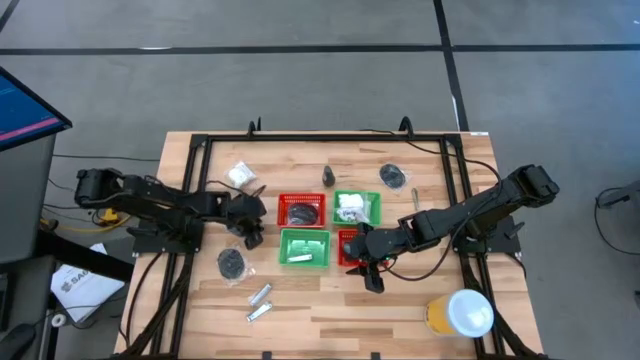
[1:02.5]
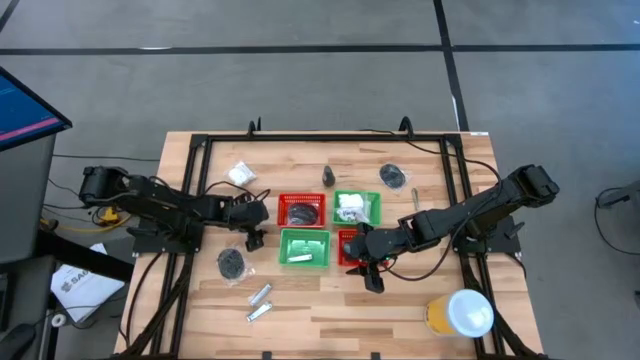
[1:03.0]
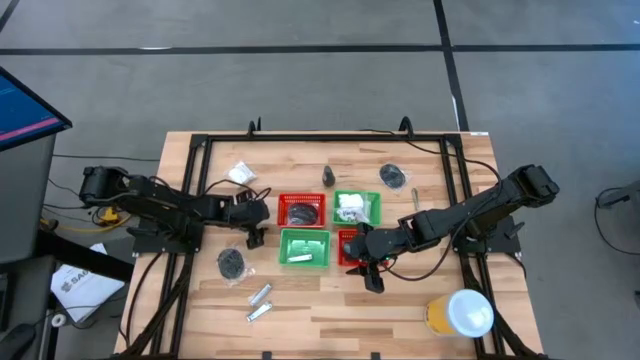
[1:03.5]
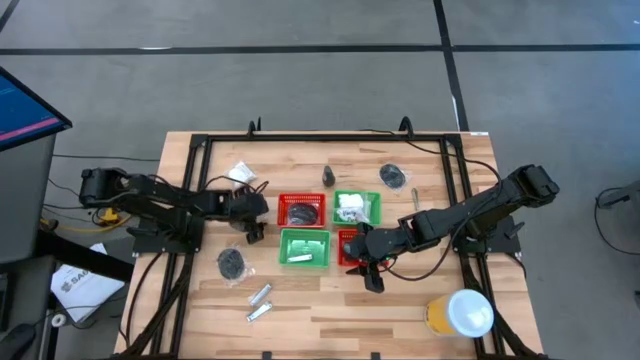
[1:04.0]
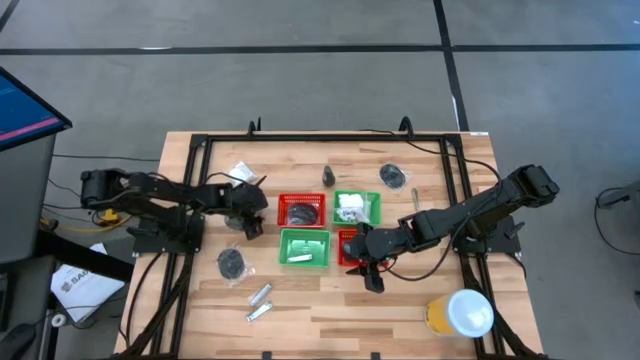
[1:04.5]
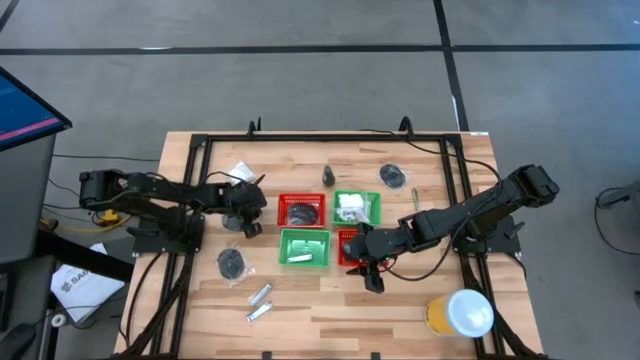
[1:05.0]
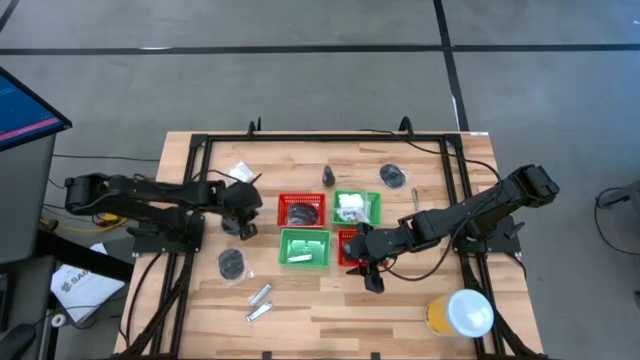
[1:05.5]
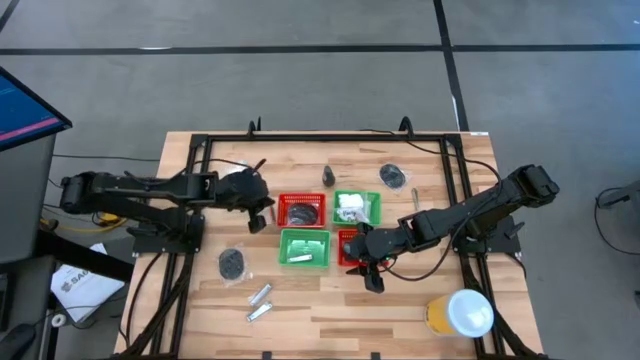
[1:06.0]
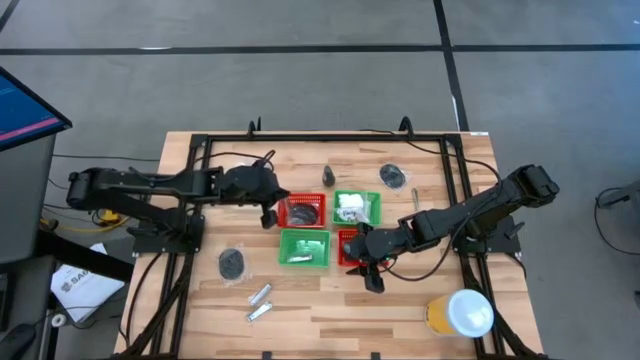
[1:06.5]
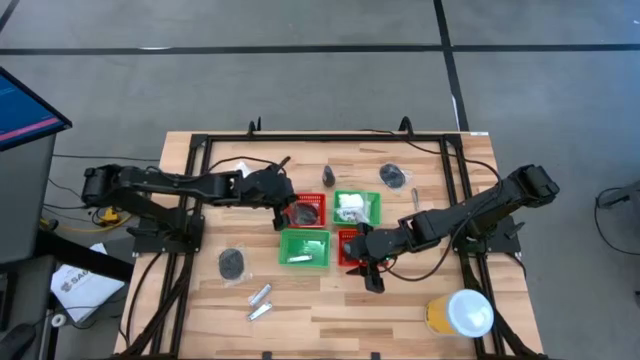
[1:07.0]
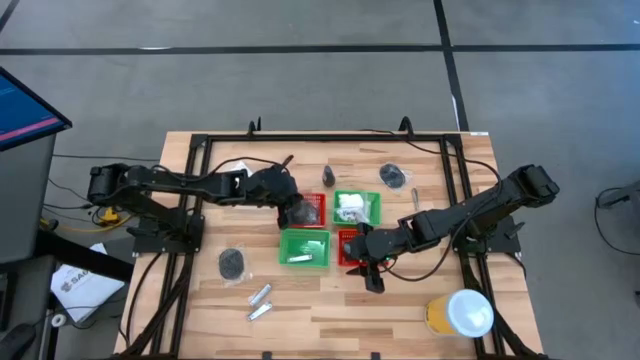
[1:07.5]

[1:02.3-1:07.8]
Task: Pick & Place Travel size toiletries
Put the black hairbrush into the left red basket

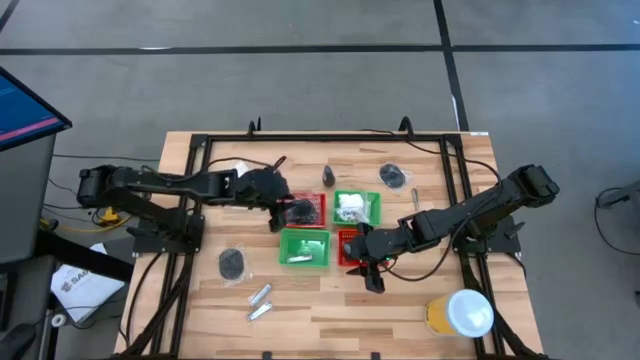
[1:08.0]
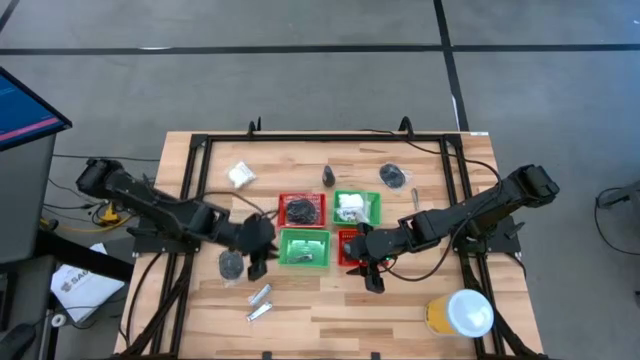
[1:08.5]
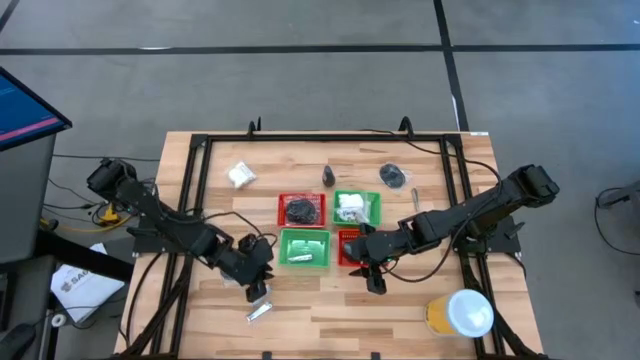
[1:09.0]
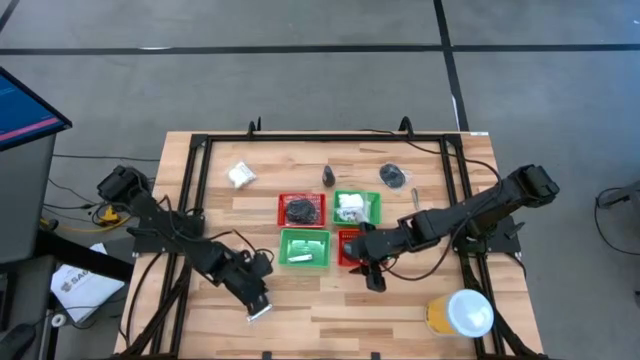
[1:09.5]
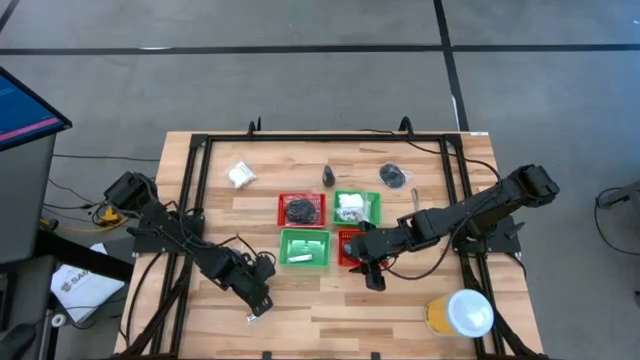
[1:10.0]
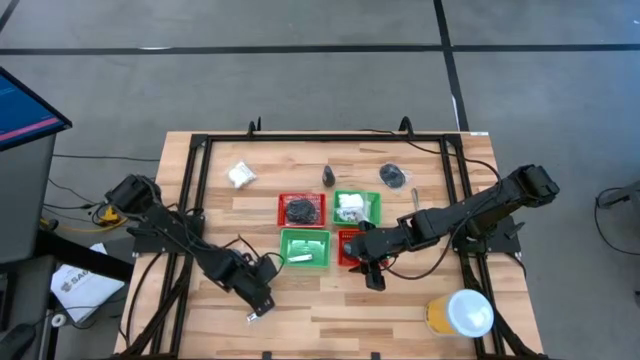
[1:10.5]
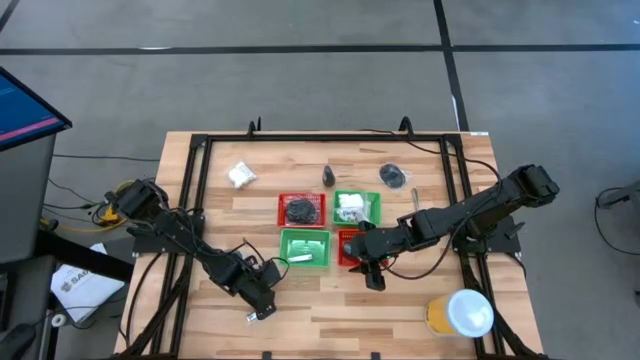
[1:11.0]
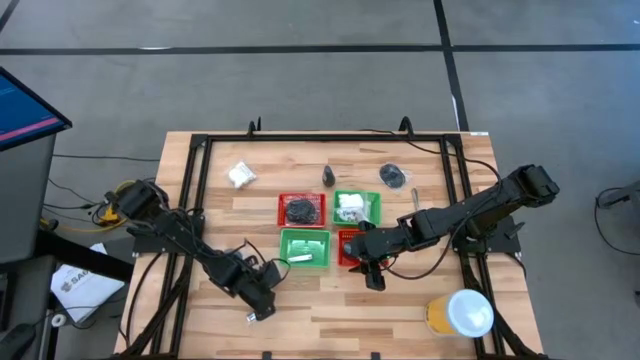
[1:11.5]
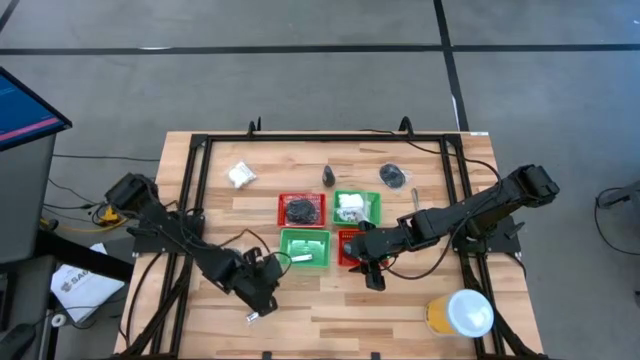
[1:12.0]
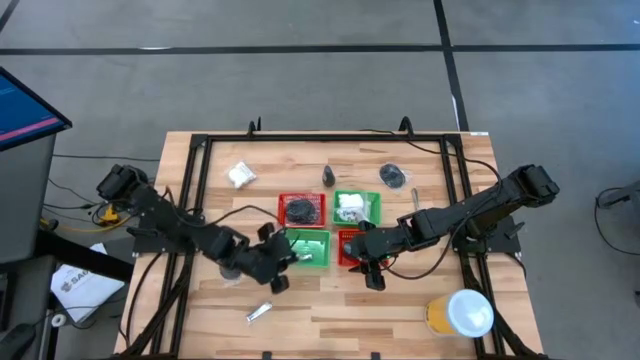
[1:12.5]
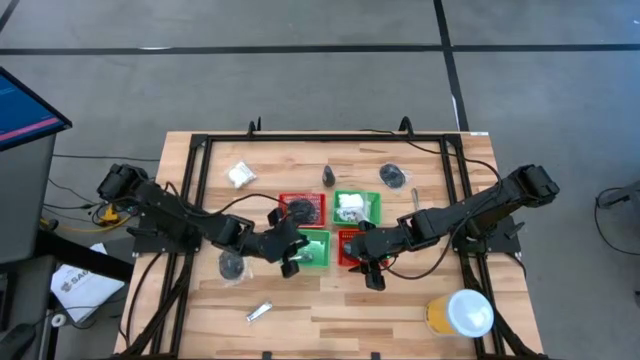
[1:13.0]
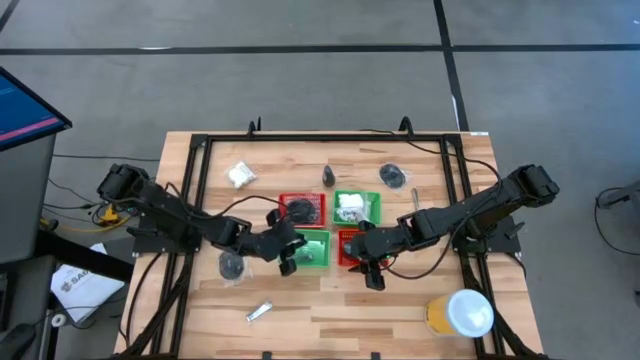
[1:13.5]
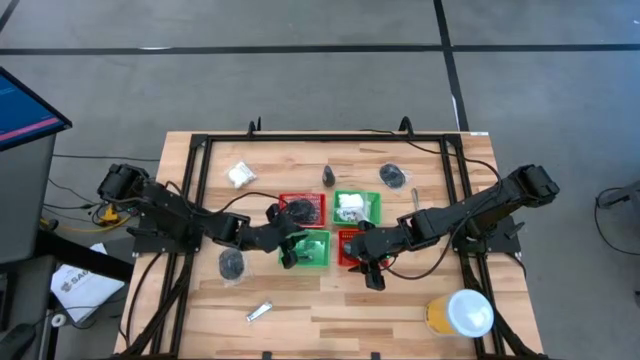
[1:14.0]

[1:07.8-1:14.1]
Put the silver nail cutter into the left green basket

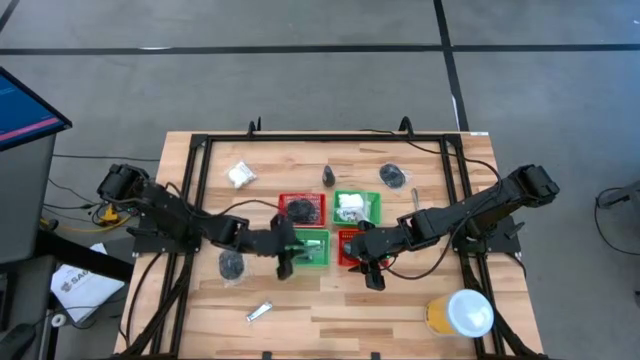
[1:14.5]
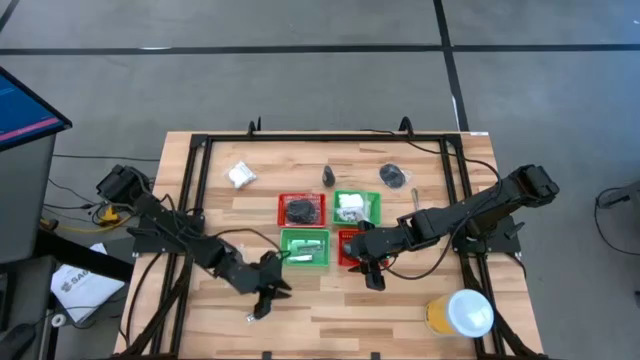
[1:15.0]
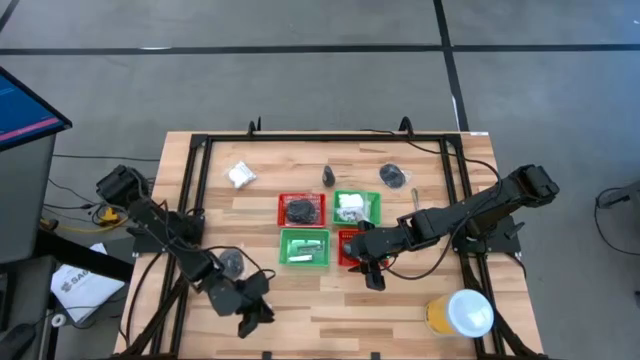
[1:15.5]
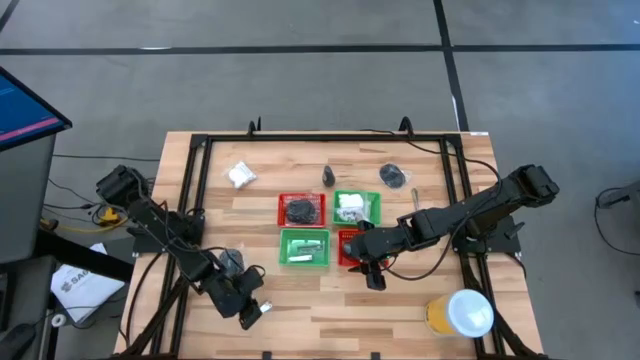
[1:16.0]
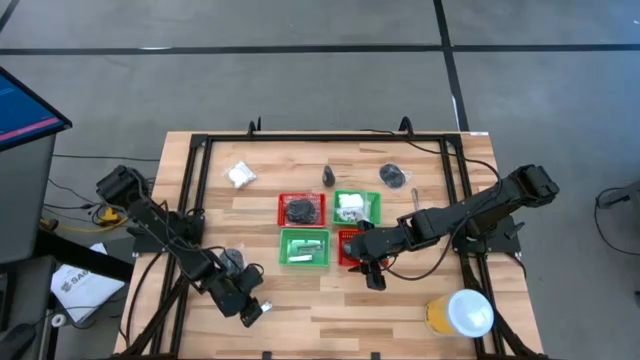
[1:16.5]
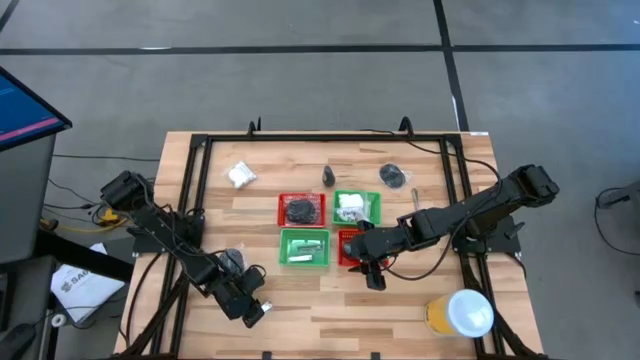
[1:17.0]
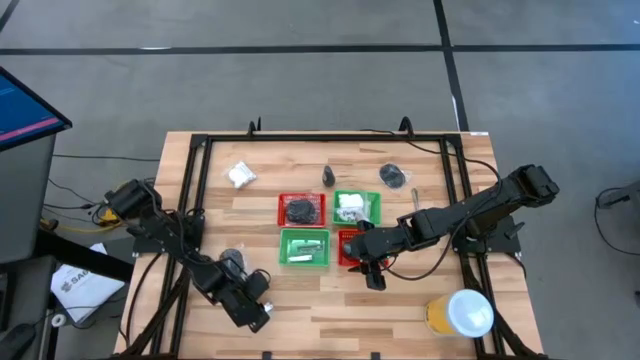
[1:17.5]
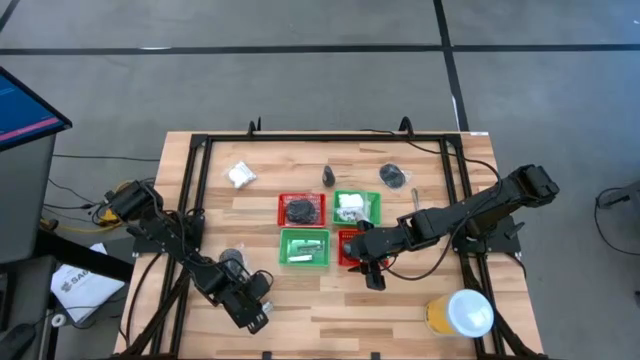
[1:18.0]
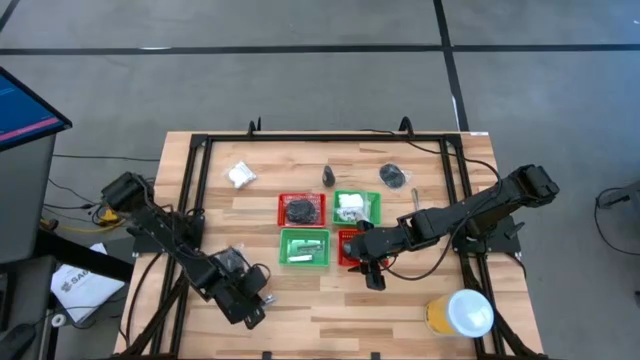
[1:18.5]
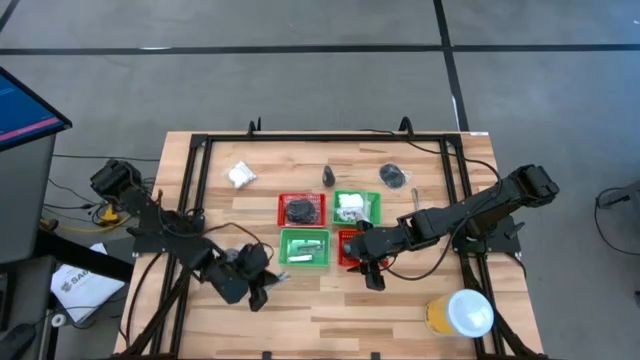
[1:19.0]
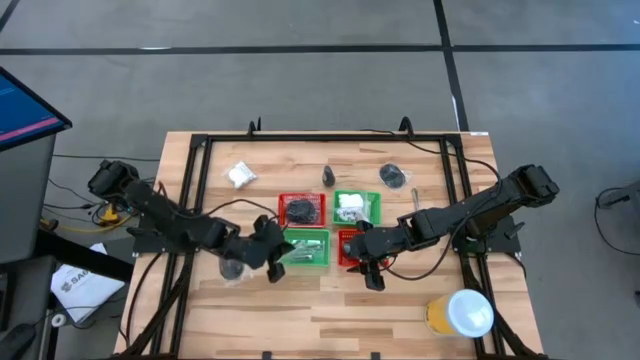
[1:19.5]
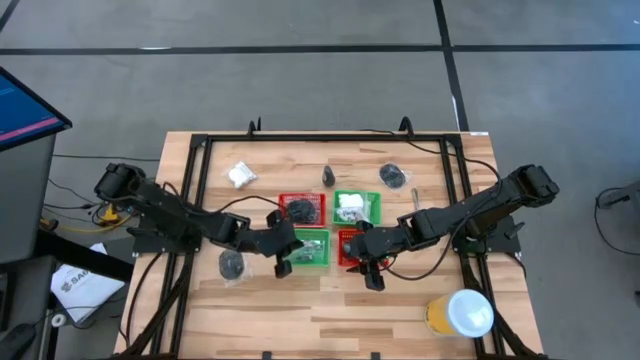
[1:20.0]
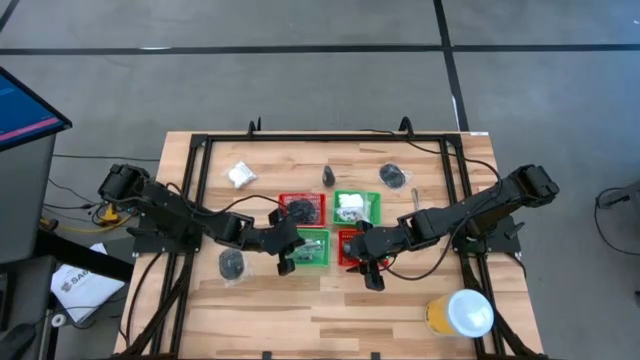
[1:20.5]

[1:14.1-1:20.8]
Put the silver nail cutter into the left green basket

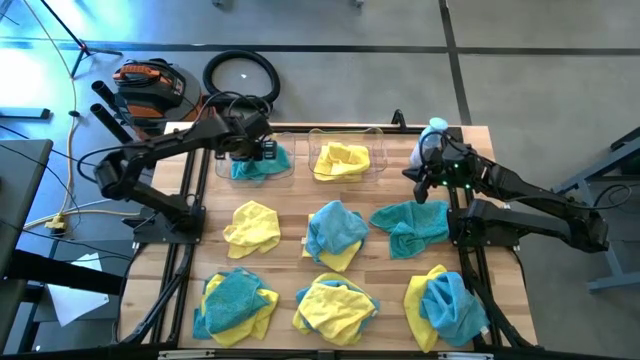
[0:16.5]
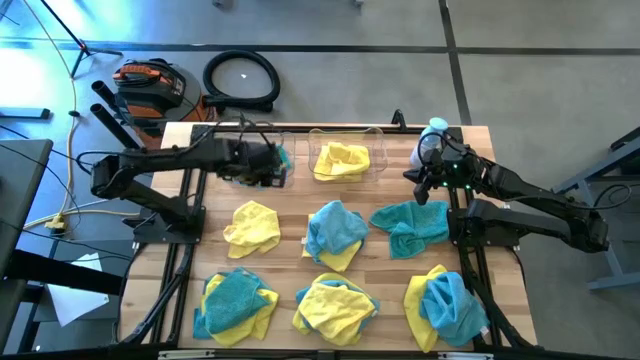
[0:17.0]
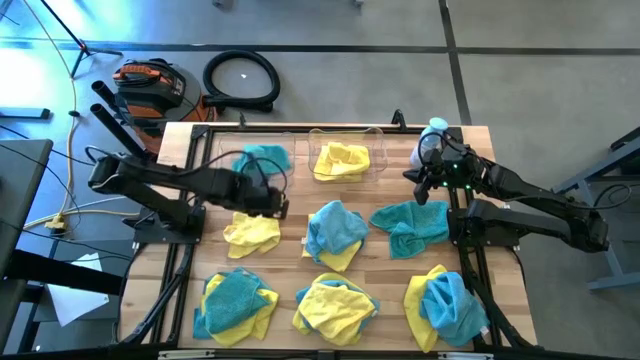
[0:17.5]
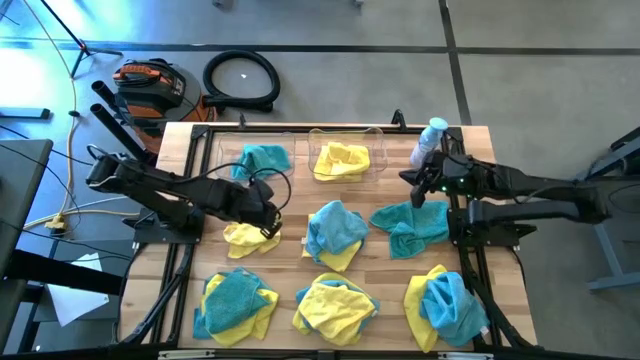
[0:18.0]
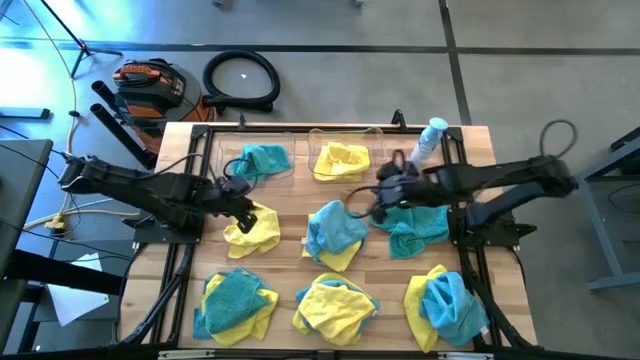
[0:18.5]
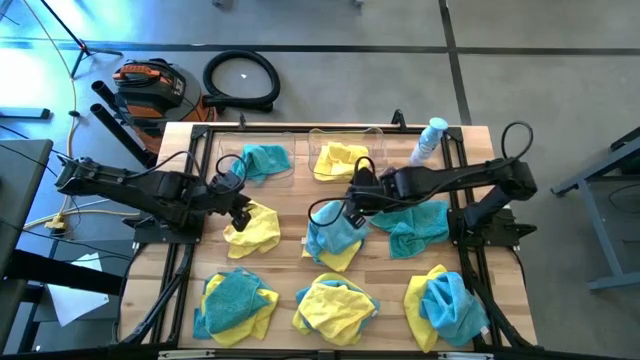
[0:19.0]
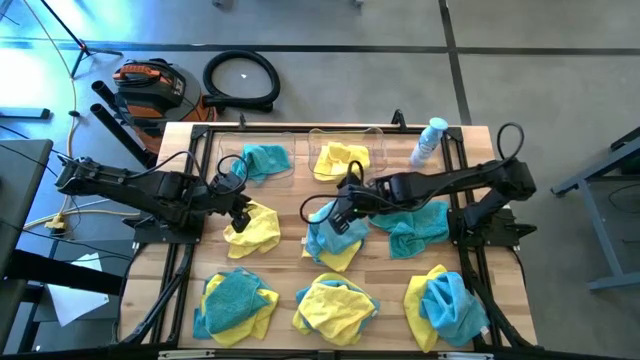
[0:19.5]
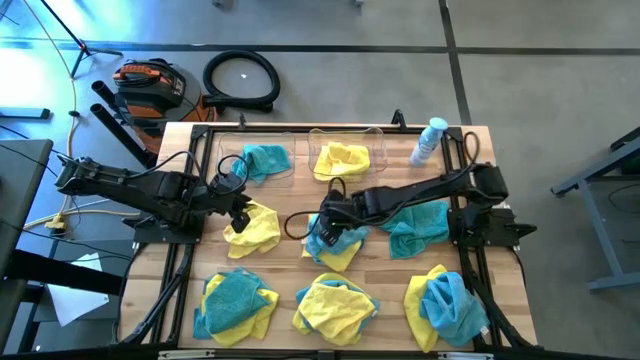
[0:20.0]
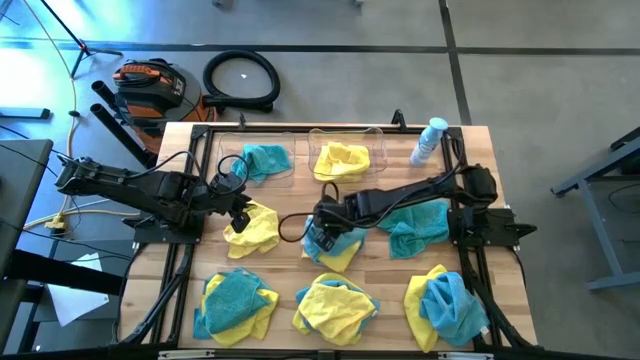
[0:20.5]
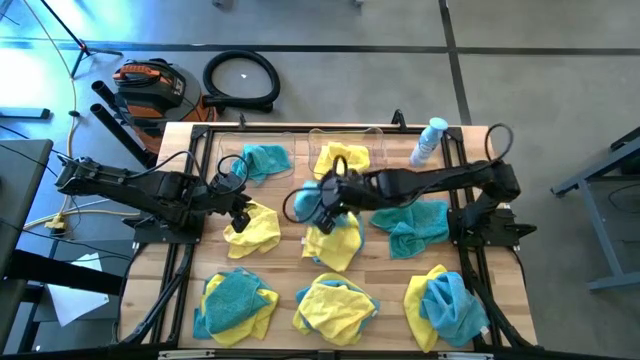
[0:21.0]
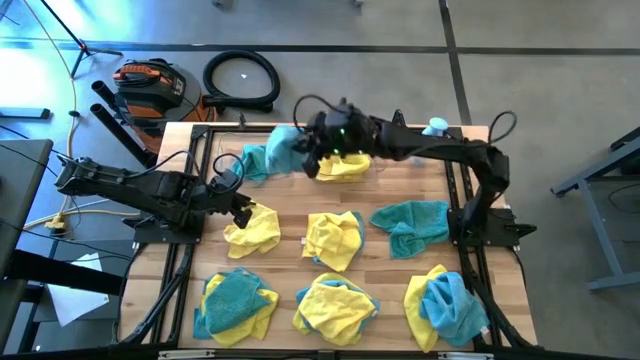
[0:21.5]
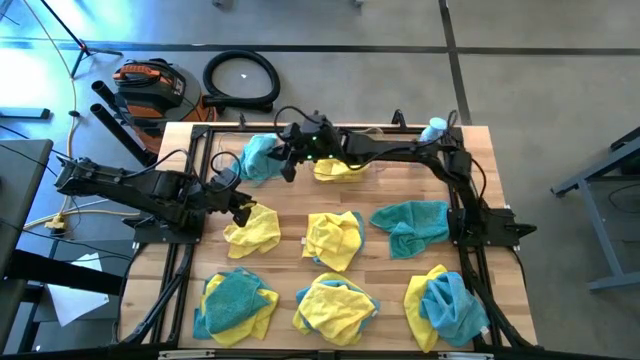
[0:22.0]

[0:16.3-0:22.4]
Task: Sort microfiber towel by color & place in baskets
Put the blue towel into the left transparent bin
